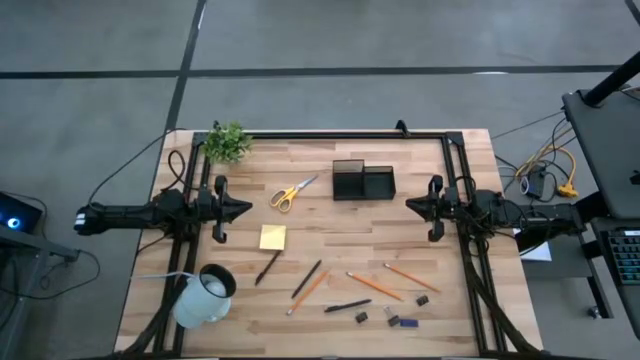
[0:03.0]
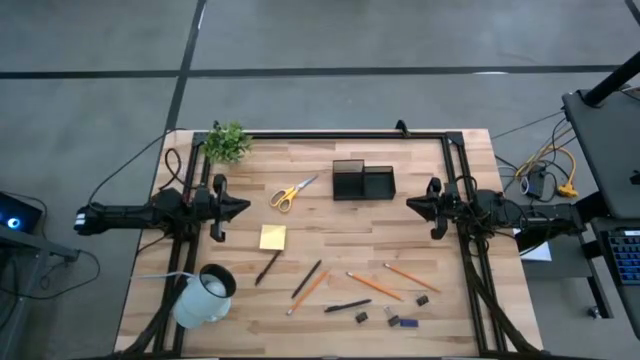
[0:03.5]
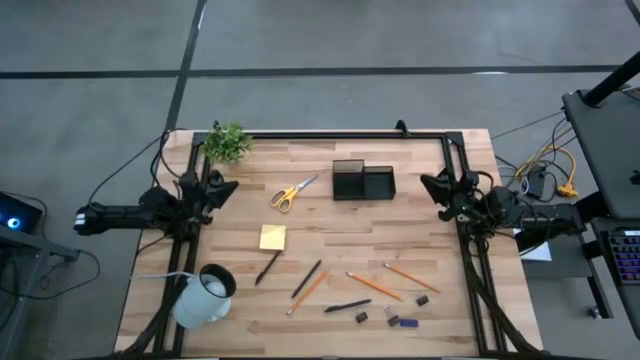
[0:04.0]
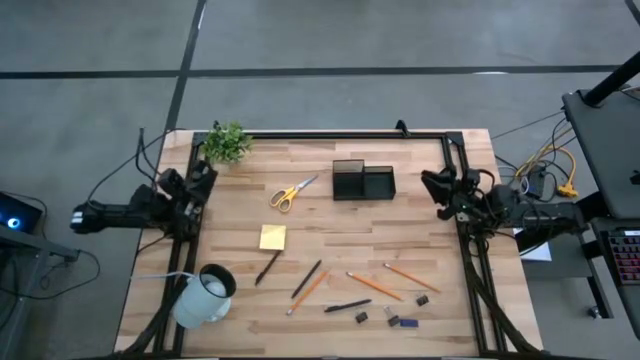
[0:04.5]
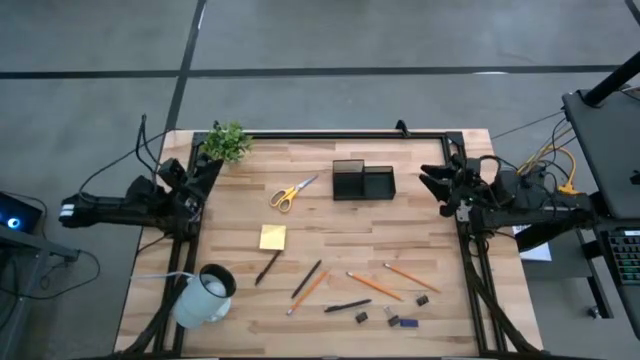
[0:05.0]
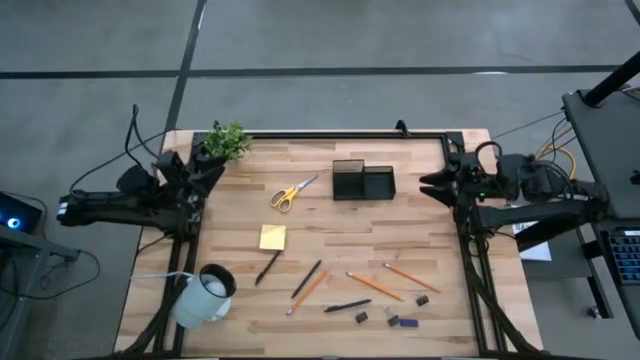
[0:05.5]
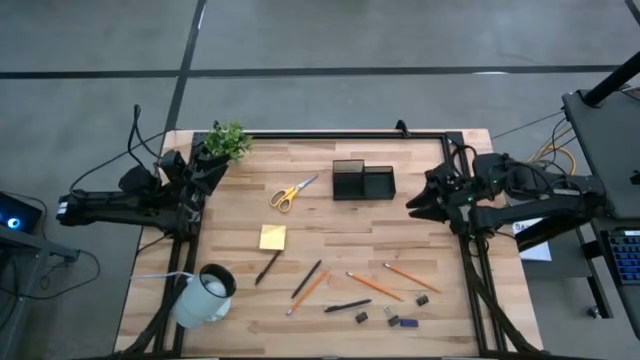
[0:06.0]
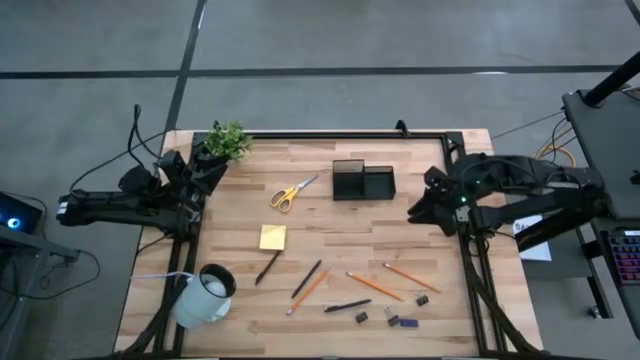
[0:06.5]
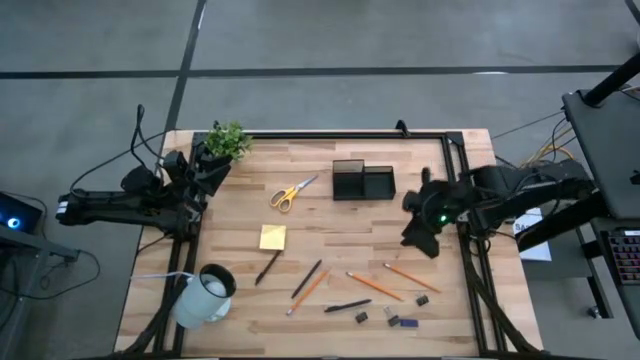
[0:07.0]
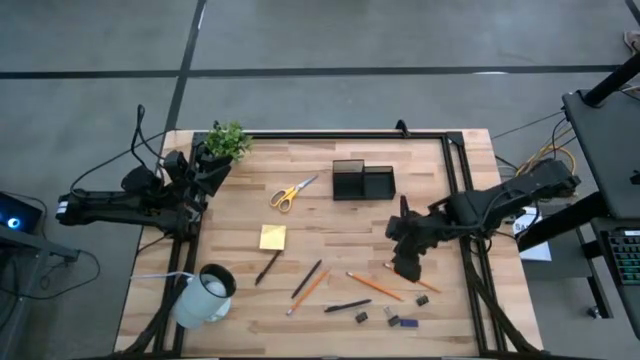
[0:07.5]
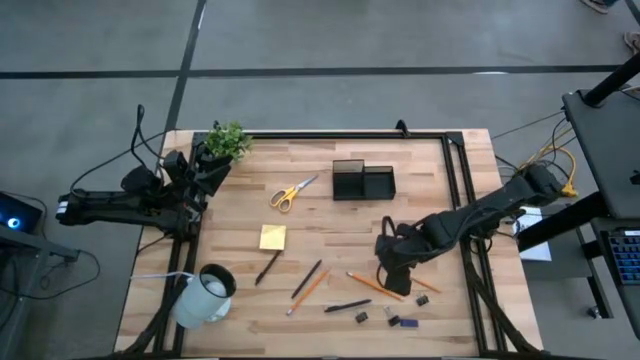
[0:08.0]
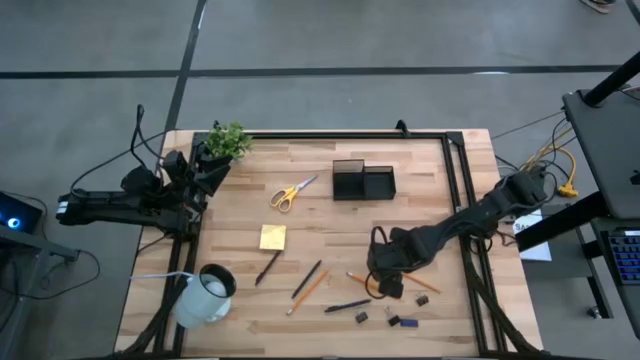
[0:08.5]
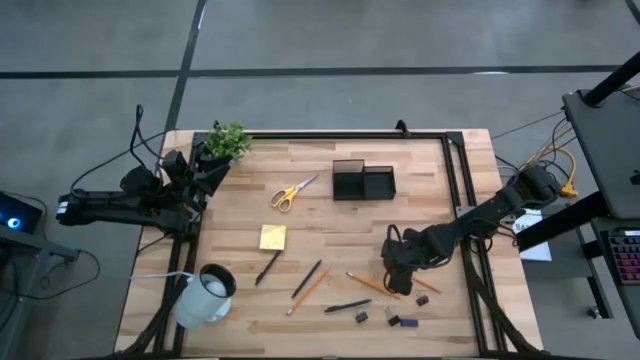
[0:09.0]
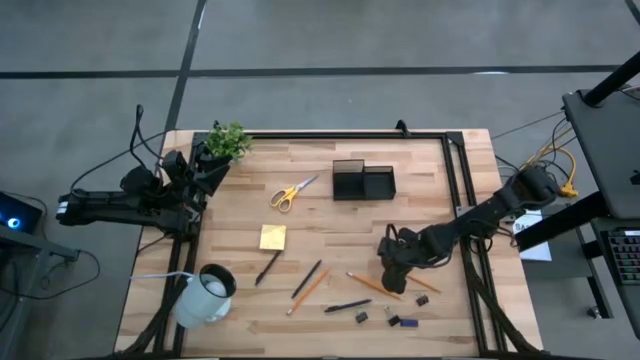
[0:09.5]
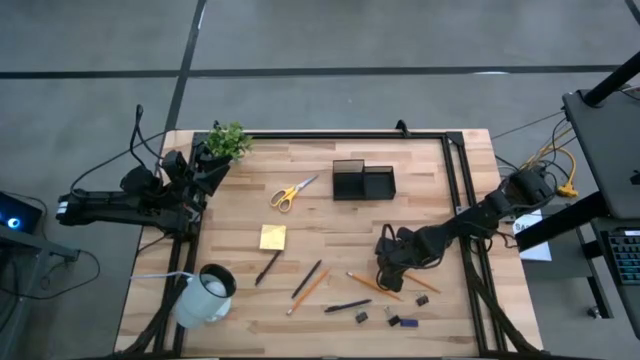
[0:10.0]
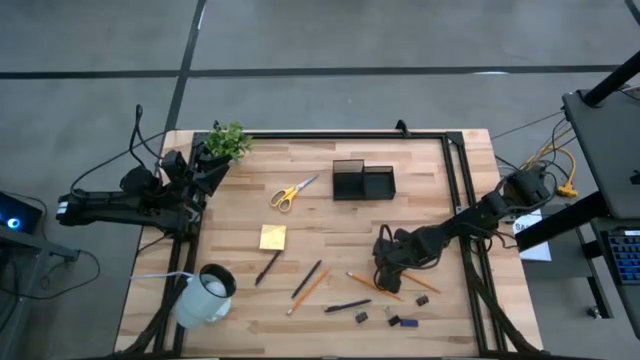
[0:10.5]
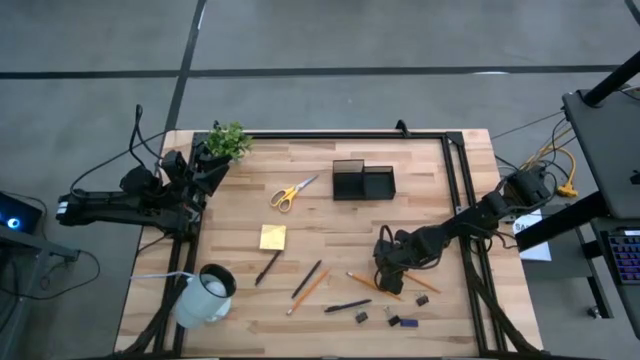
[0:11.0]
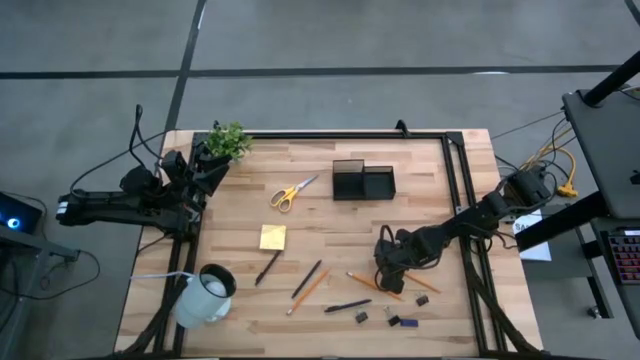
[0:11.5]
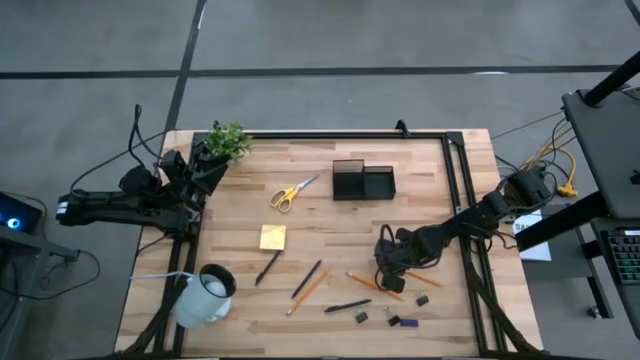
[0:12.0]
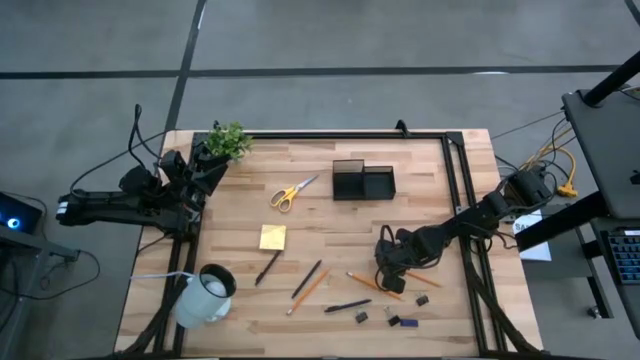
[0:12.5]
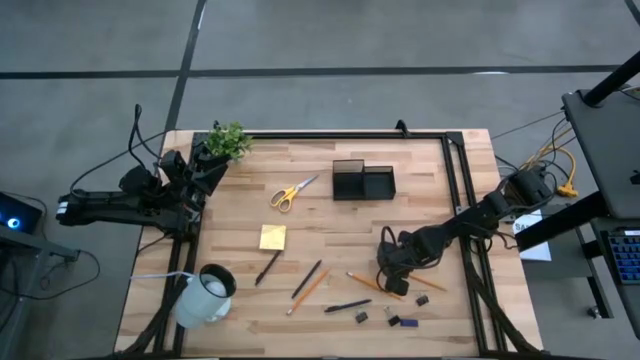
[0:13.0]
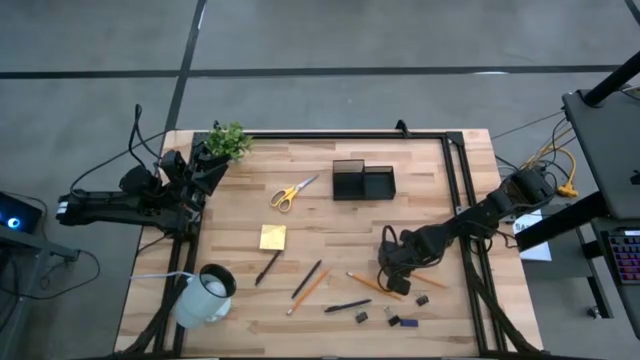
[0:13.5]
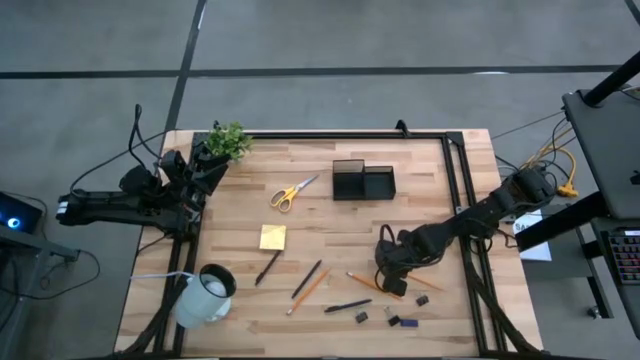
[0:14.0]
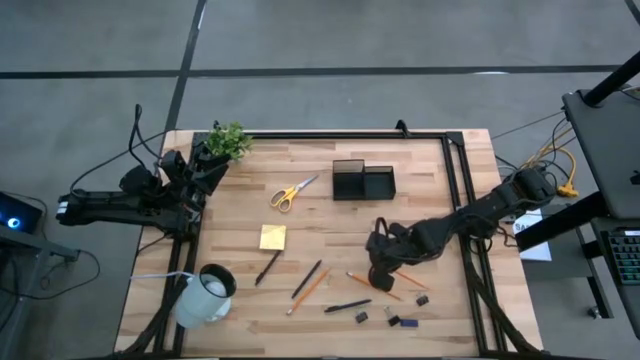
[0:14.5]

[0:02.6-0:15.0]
Task: Pick and place office supplies into organizer
Put the right pencil into the desk organizer

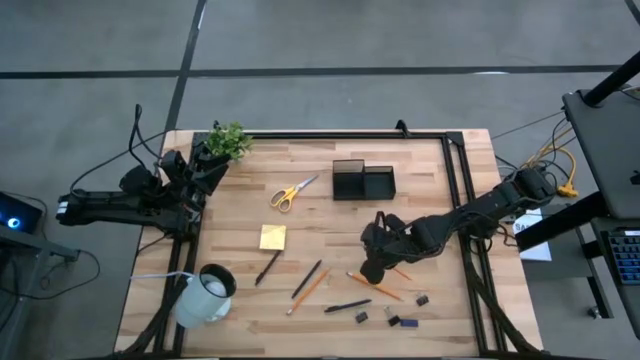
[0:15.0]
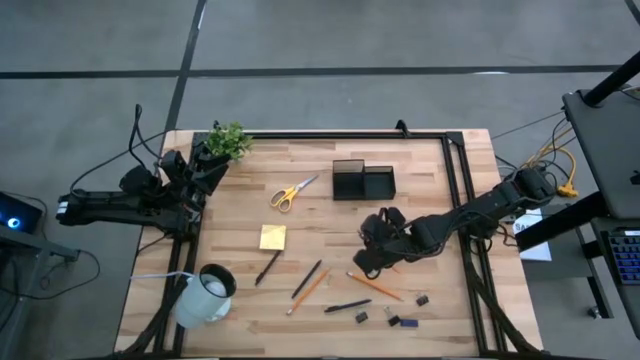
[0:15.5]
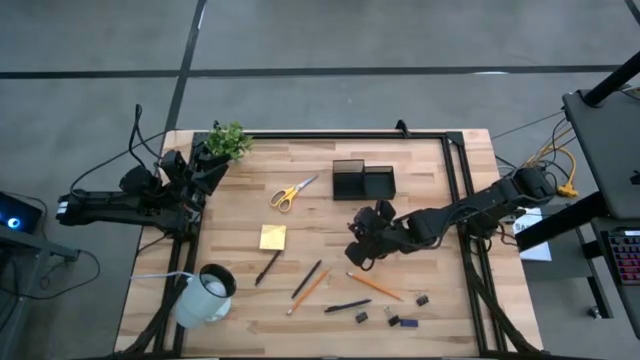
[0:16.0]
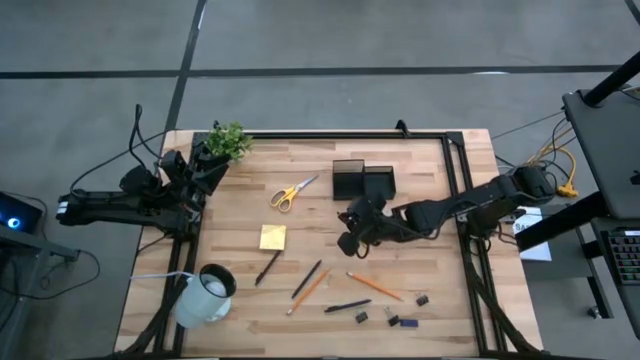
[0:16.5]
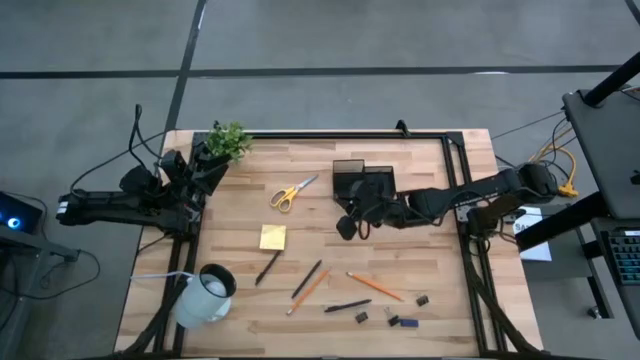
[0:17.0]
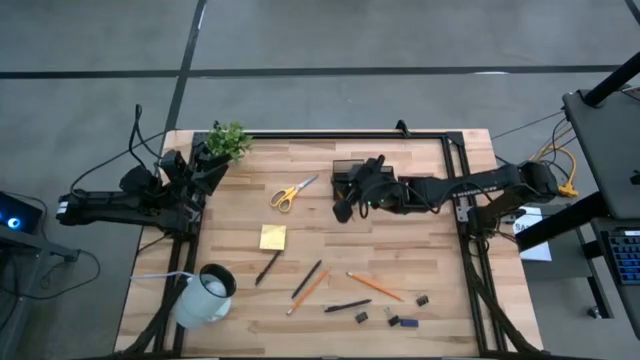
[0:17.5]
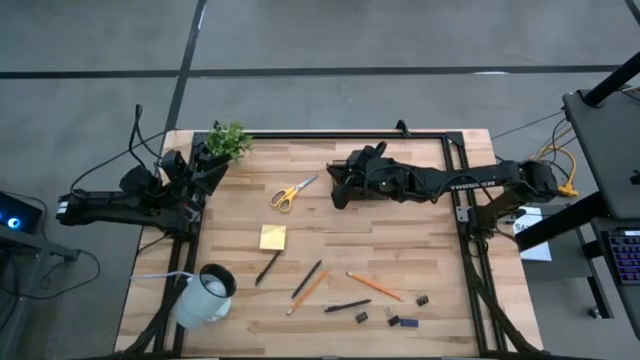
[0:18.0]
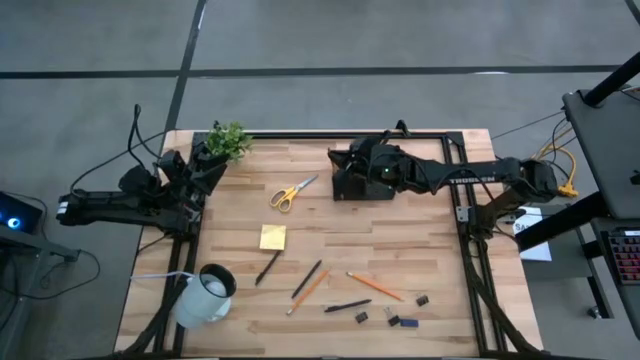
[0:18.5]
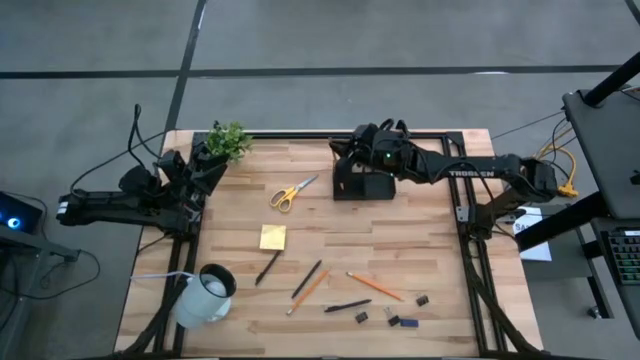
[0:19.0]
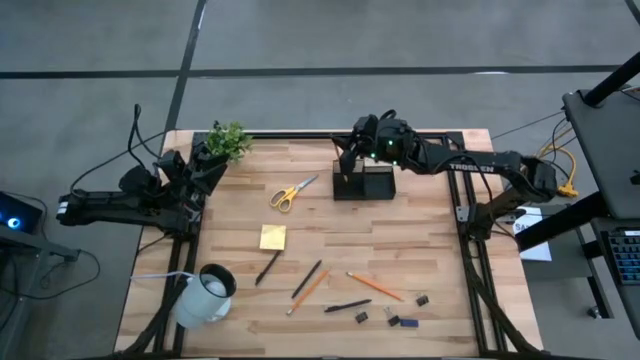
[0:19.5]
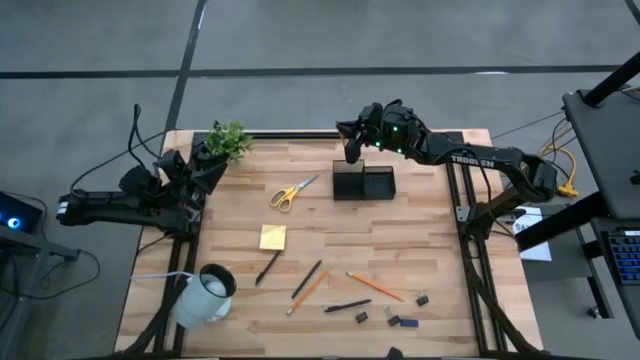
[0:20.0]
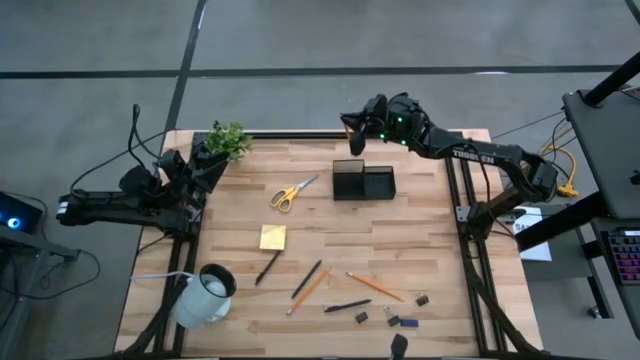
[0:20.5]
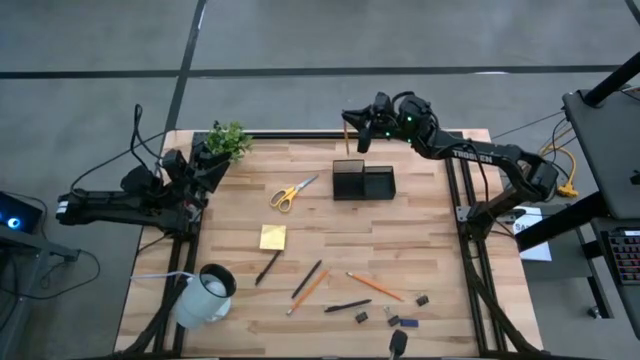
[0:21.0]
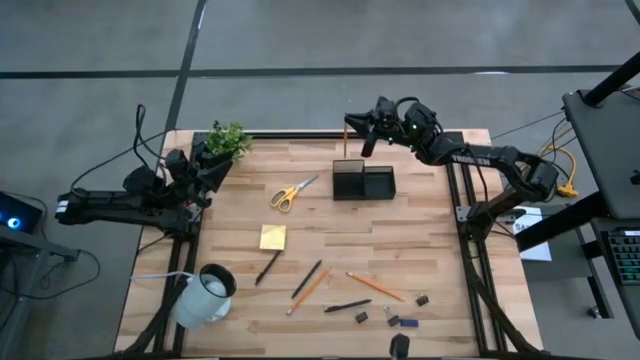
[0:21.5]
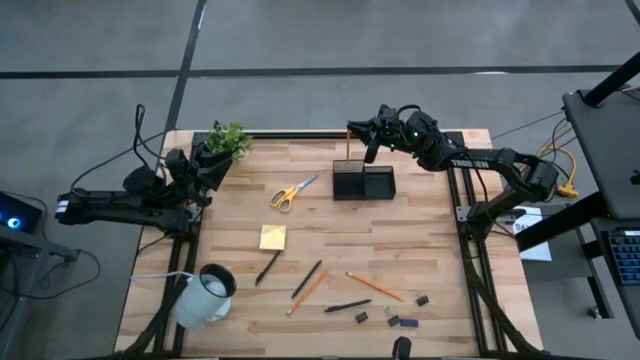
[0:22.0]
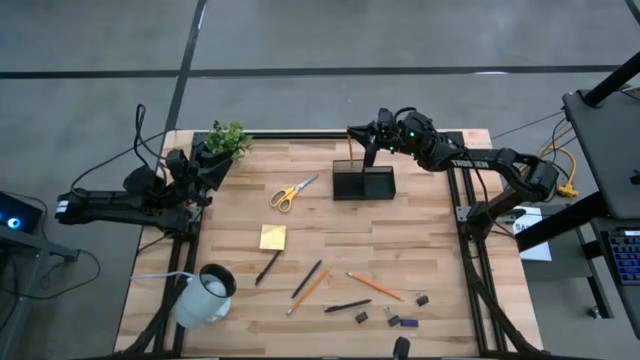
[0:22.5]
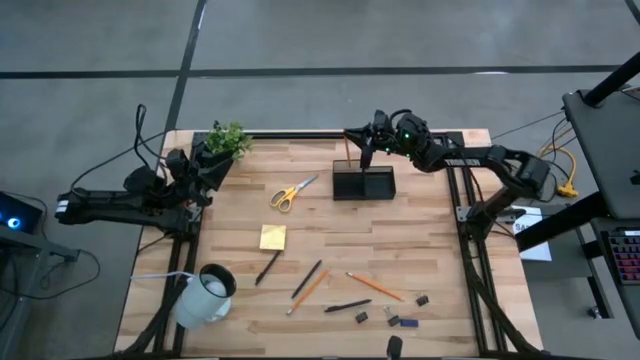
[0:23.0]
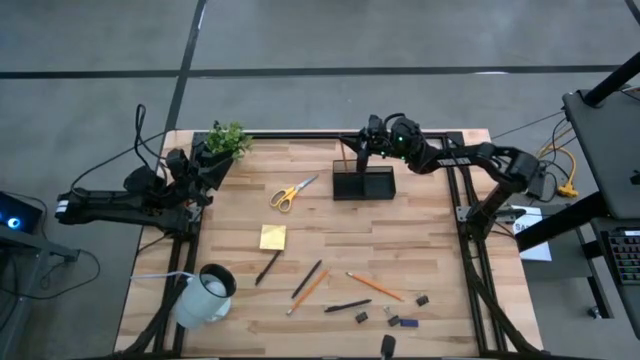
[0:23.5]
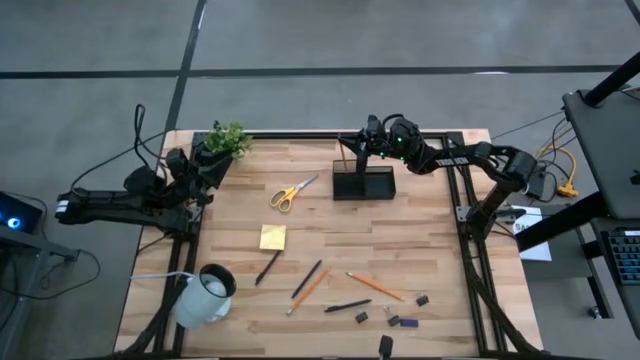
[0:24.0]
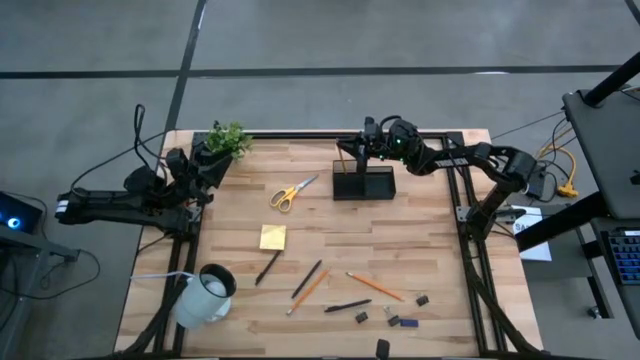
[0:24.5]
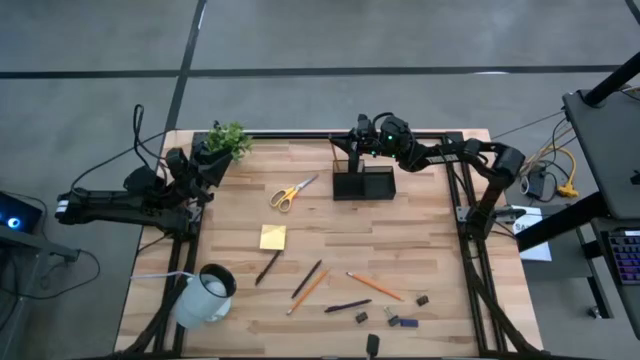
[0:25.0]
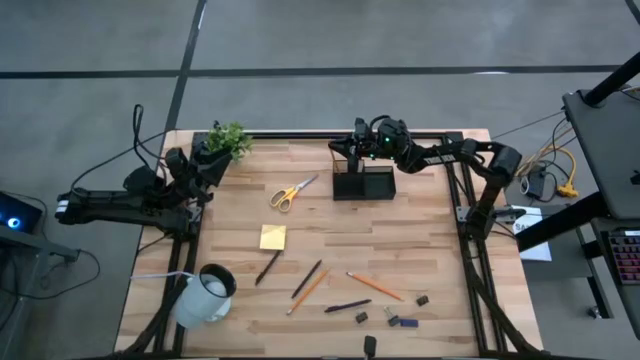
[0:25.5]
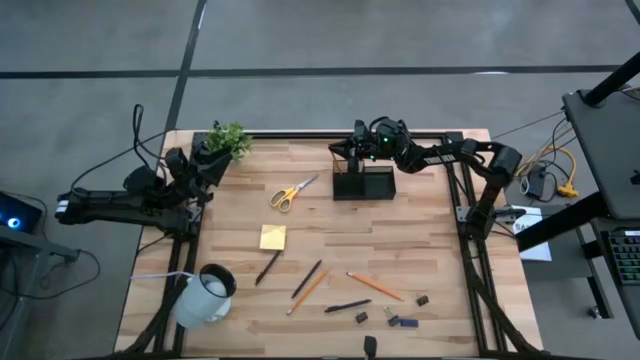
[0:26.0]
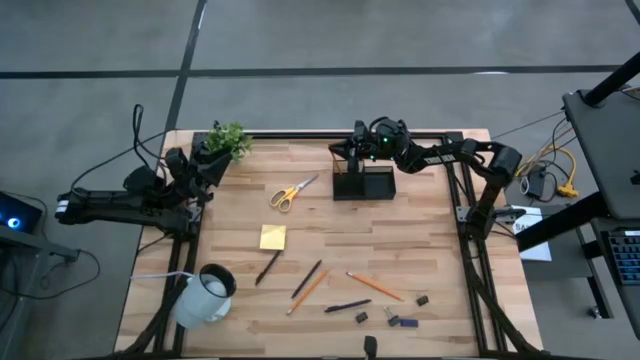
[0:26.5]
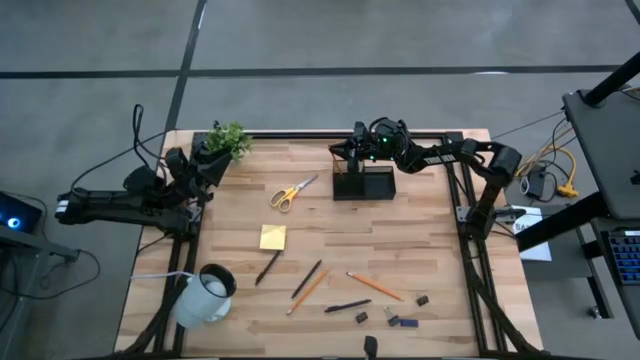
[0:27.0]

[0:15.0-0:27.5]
Put the right pencil into the desk organizer
